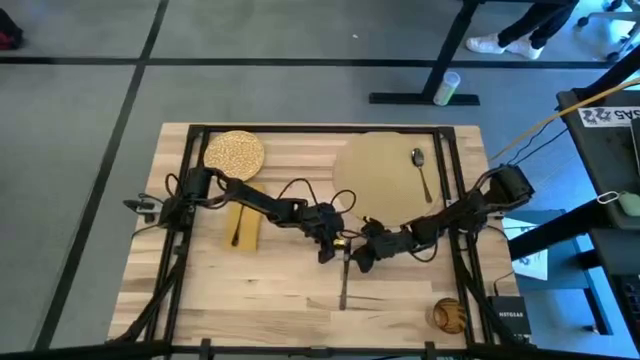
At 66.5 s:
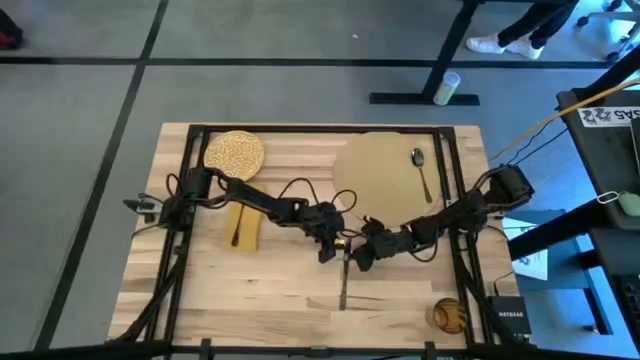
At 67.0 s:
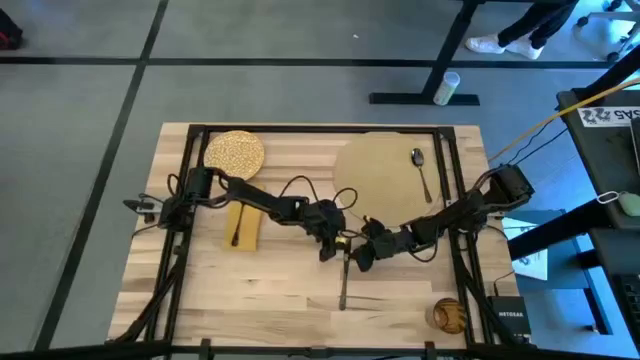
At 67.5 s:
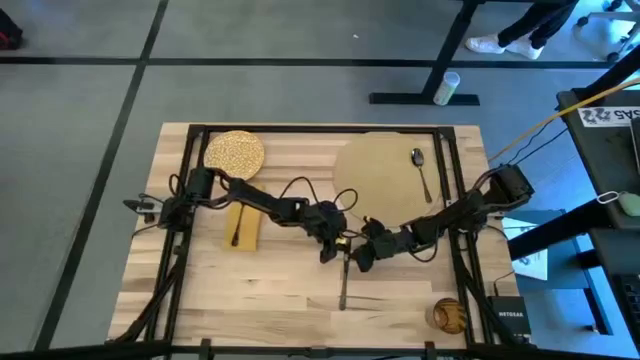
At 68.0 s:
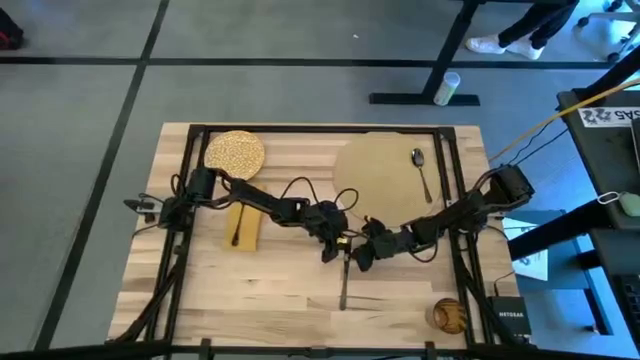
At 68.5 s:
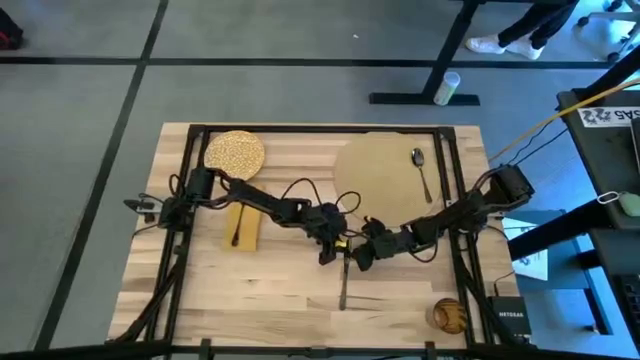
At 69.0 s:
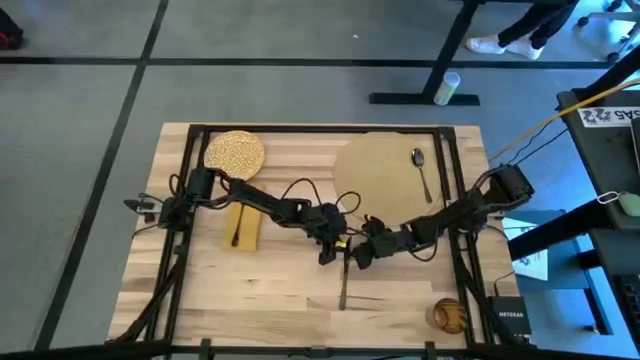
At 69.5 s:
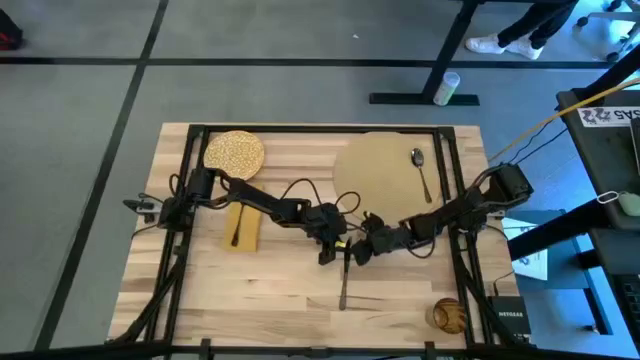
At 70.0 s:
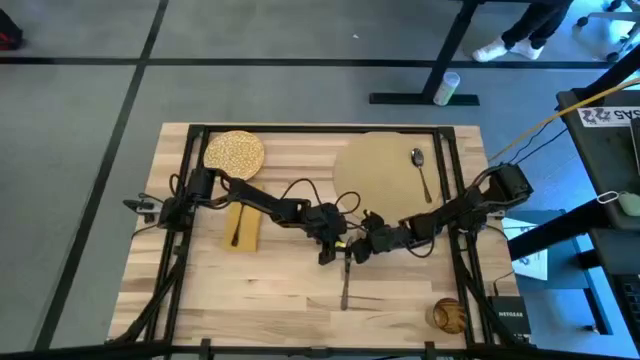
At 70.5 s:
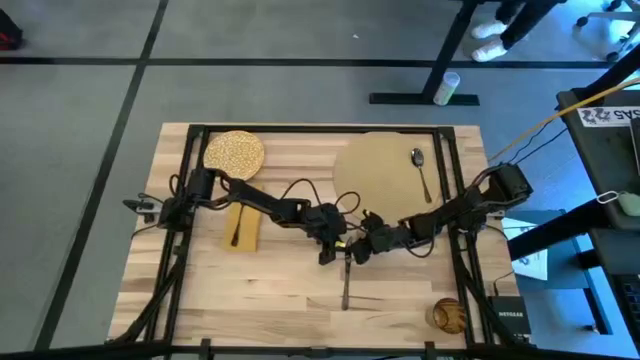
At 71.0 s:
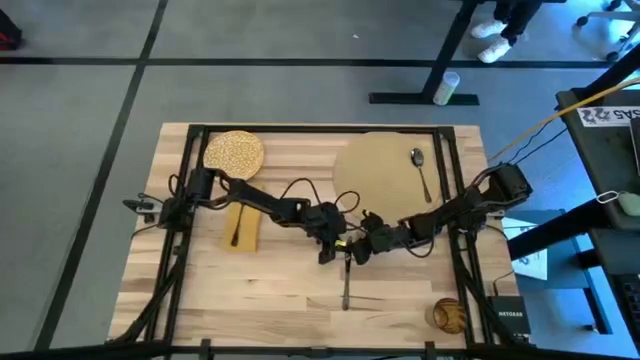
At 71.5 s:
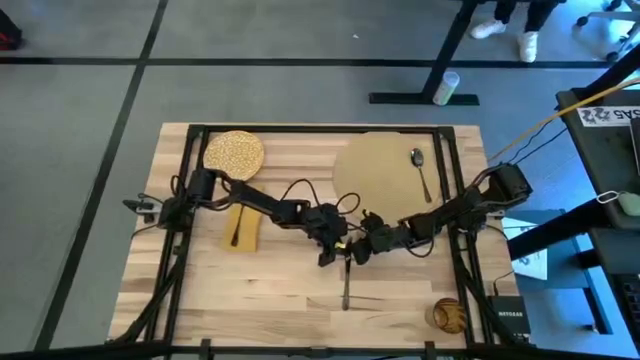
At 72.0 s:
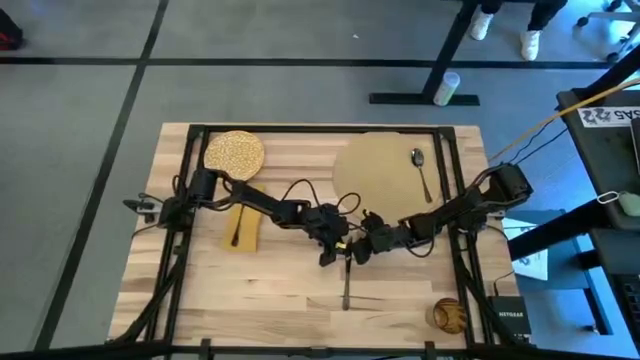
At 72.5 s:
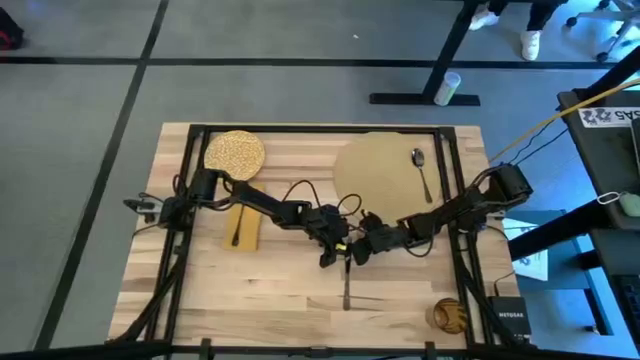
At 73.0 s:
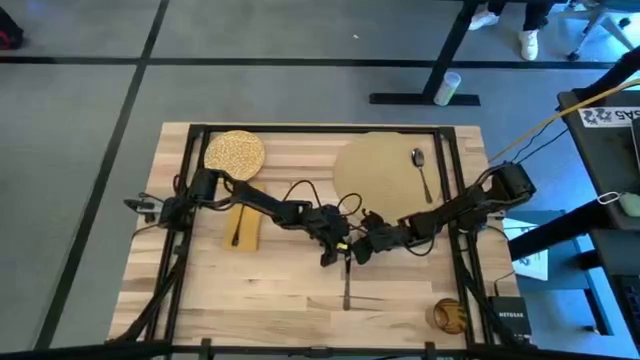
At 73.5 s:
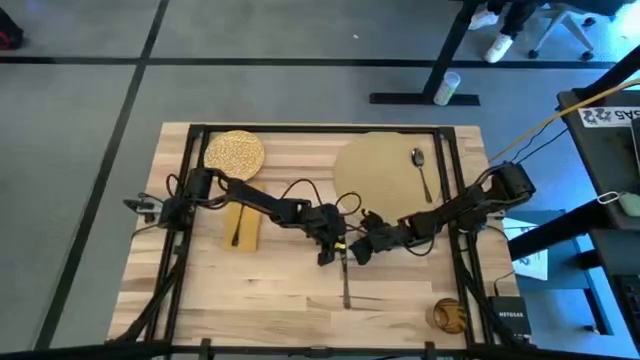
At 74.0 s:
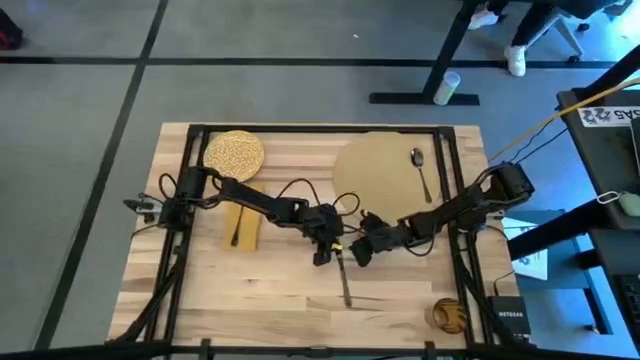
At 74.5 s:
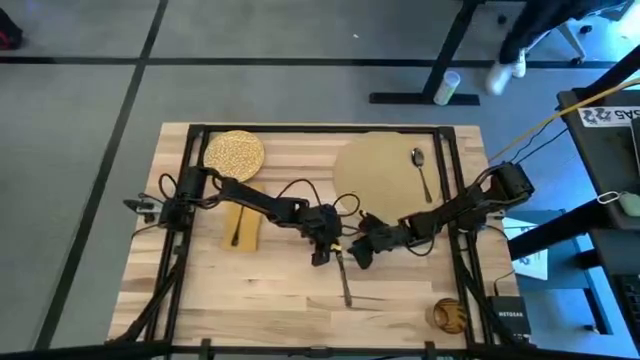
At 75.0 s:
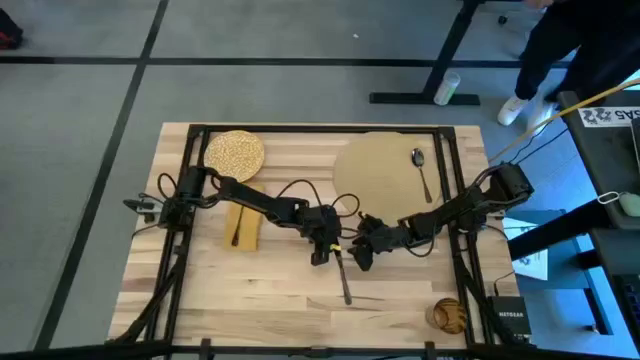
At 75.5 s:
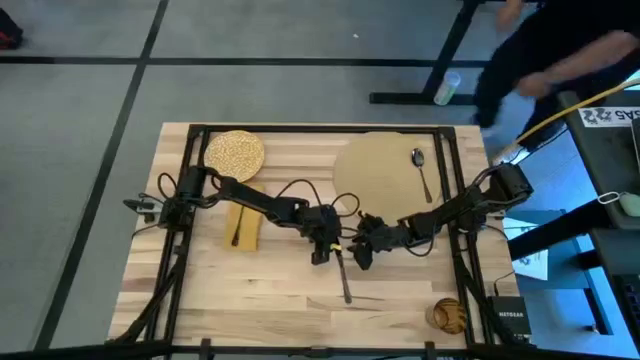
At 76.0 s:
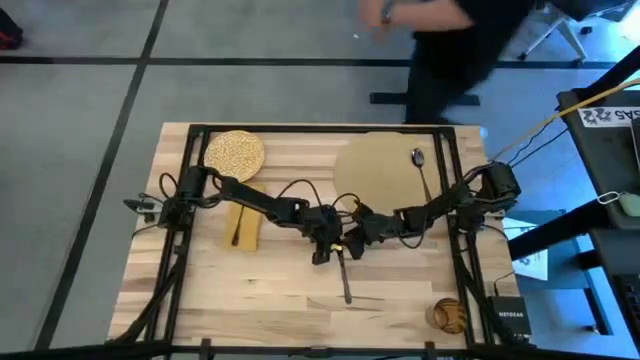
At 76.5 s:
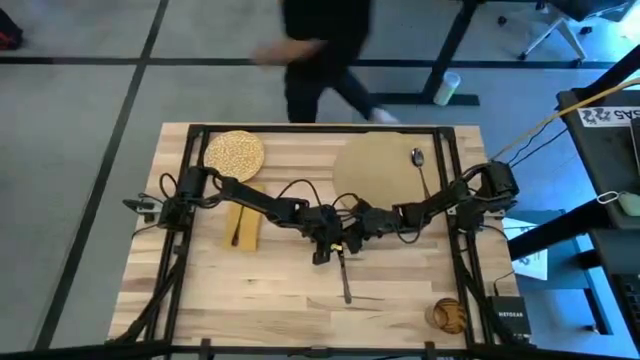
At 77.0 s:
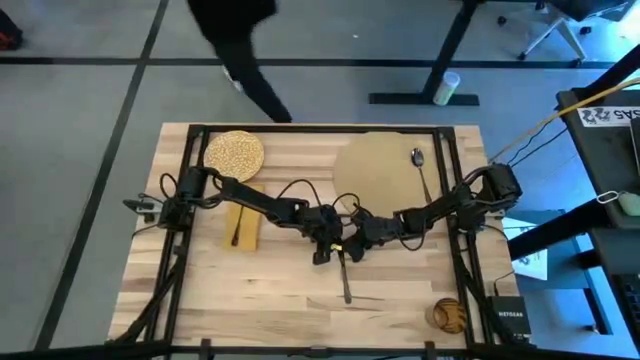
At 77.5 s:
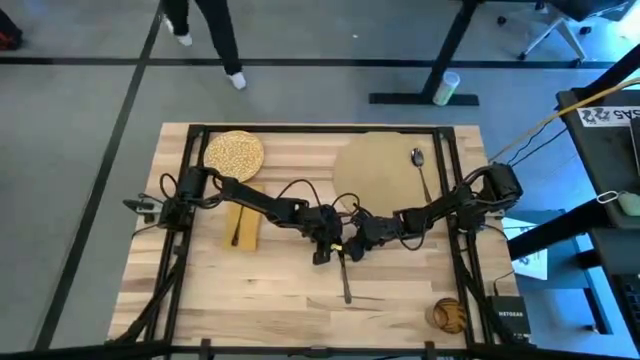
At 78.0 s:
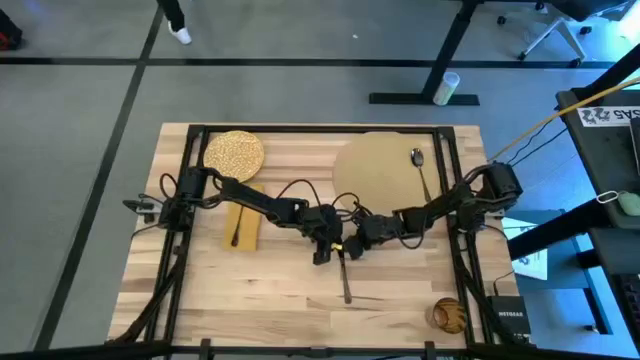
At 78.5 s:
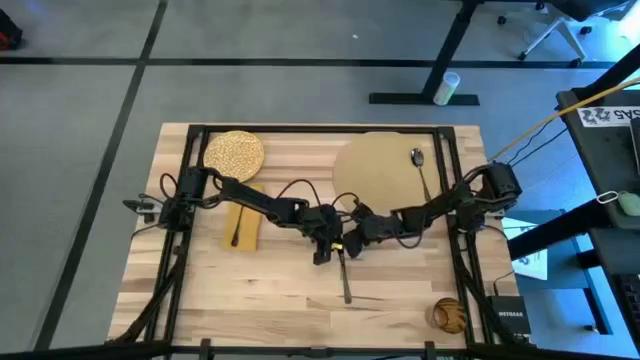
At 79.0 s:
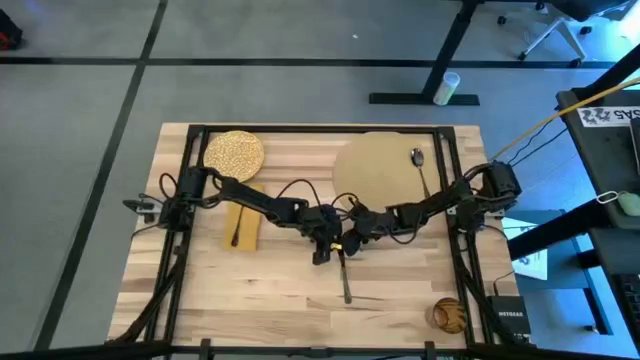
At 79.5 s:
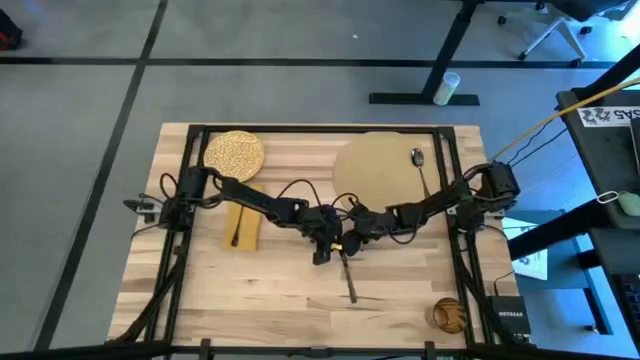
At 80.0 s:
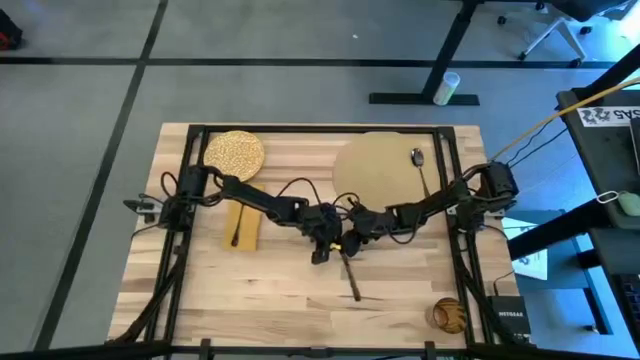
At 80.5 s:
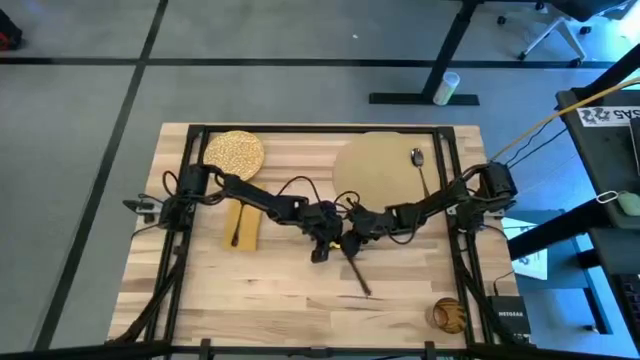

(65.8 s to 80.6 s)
Task: Set table place
Put the knife to the left of the spoon on the woven mat

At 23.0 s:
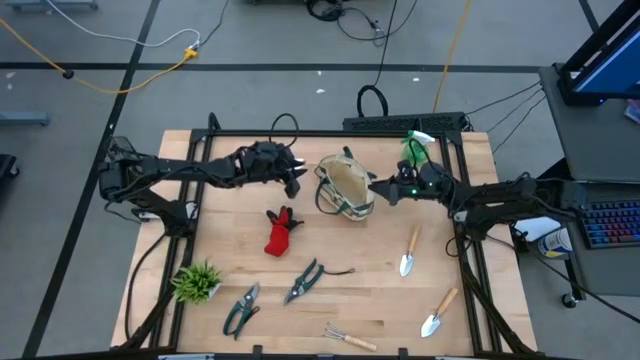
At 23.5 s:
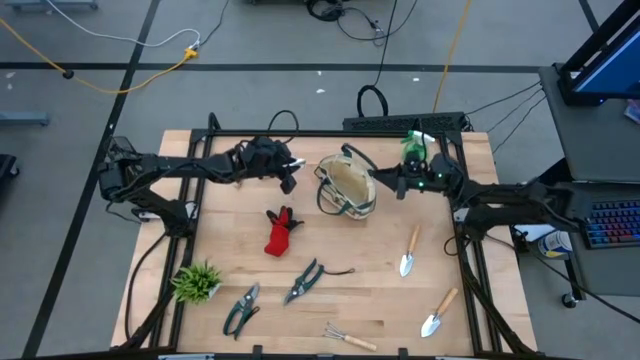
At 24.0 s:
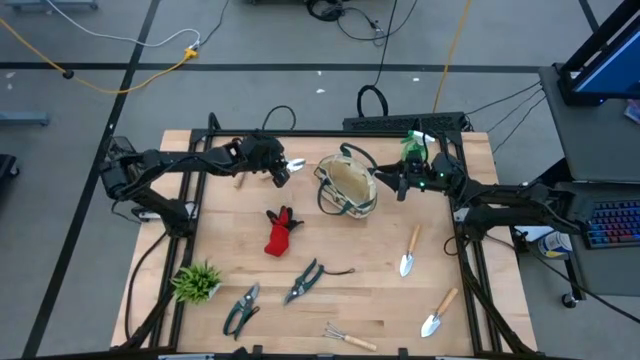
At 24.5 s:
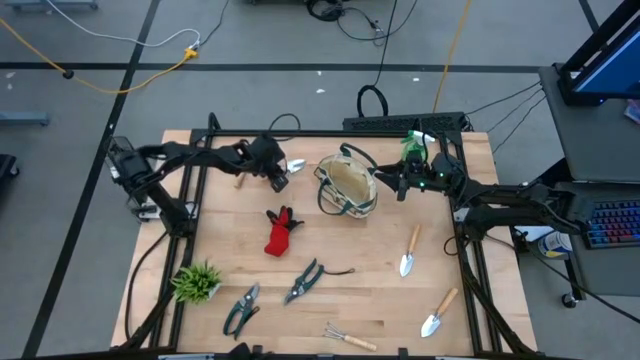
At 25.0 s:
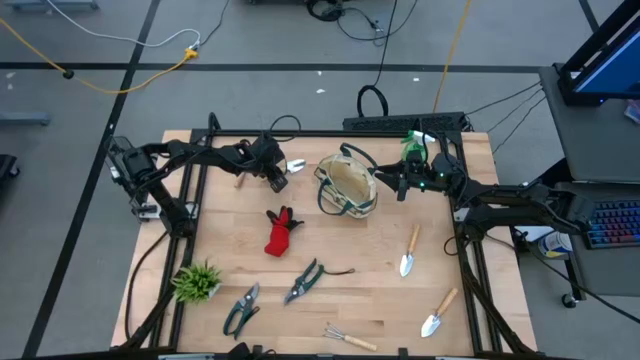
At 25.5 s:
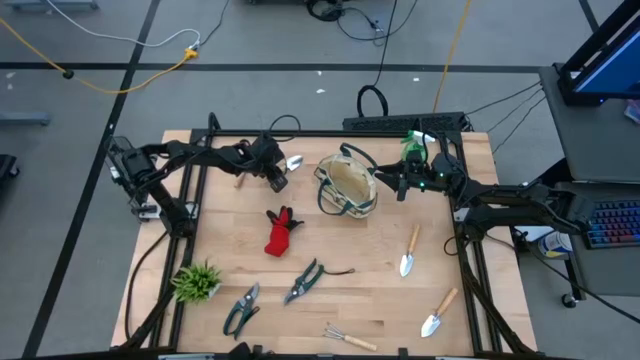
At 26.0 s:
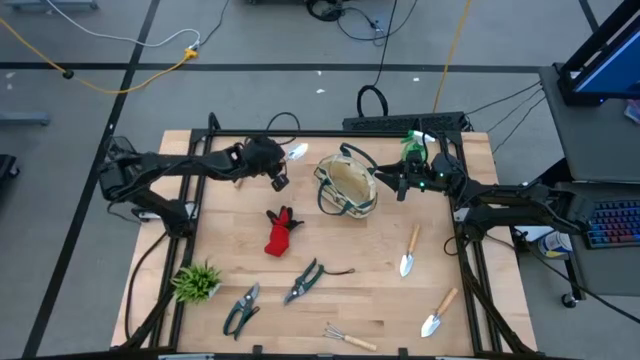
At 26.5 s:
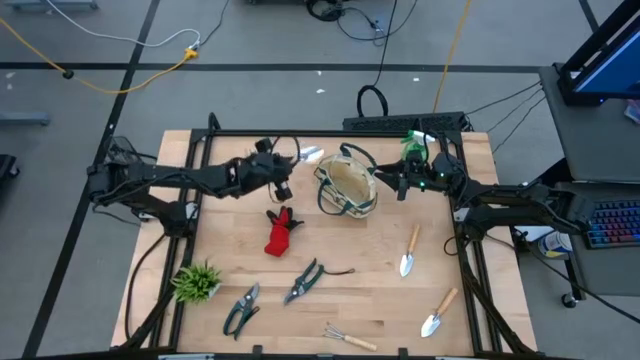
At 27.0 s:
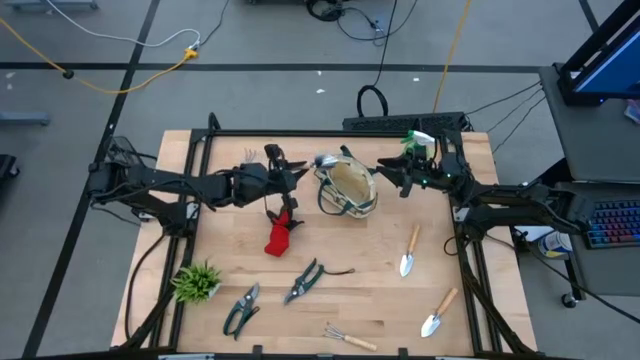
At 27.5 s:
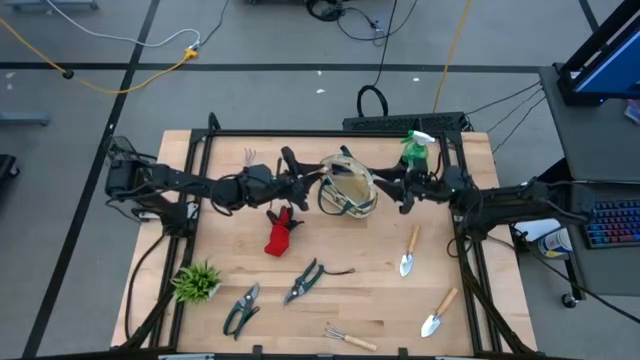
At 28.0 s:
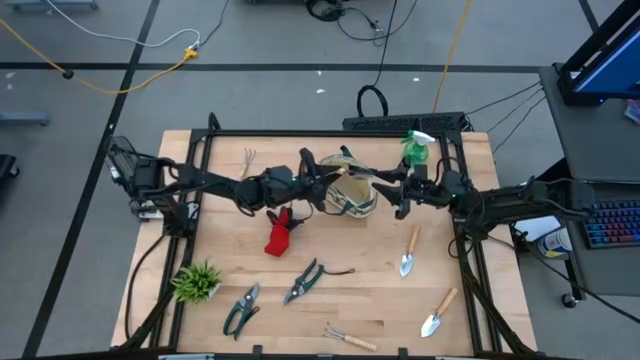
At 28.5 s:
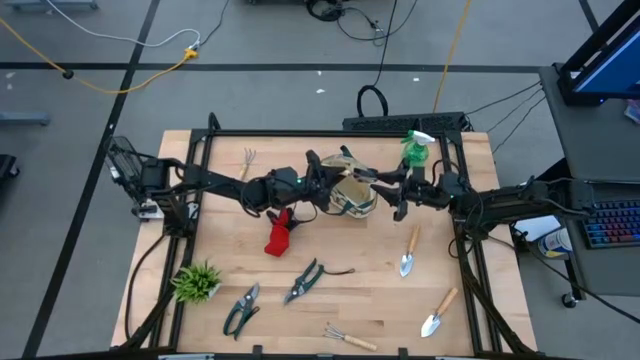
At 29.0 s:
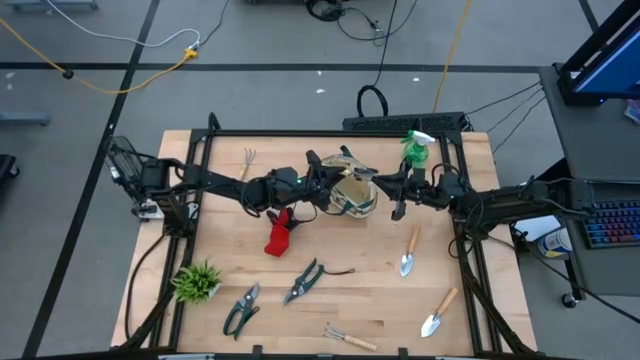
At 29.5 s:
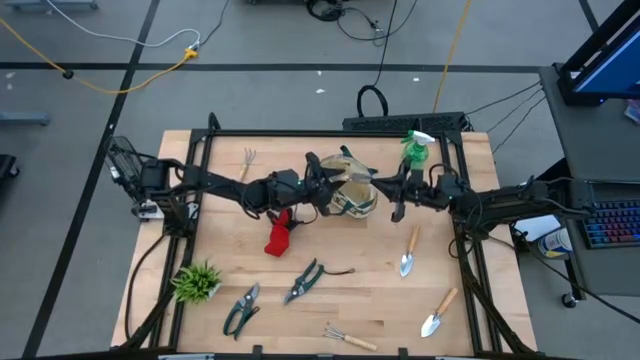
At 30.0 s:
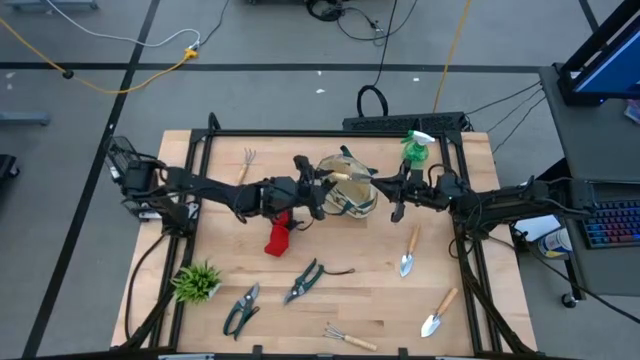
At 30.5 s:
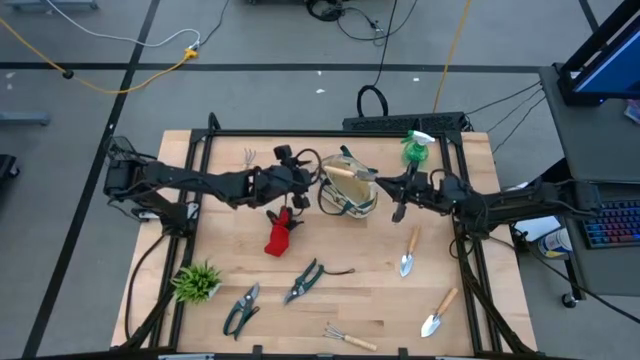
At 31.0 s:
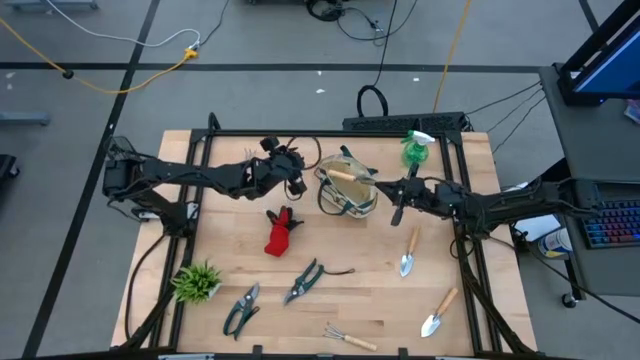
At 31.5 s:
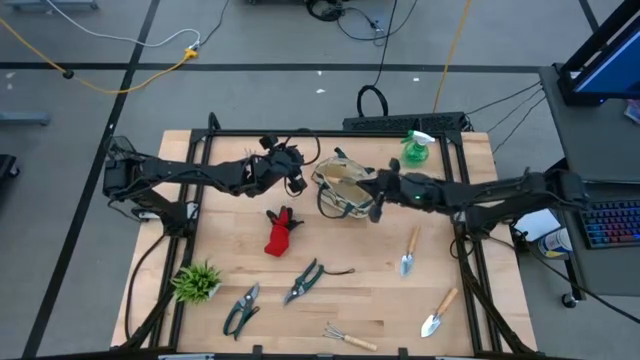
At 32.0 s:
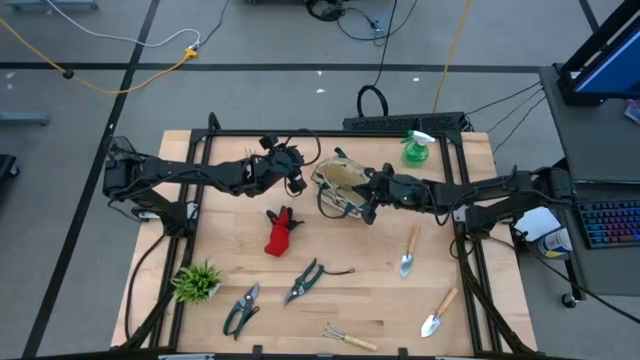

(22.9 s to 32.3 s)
Task: Pick & Place Garden tools in Gardening bag
Put the top brown trowel into the gardening bag
